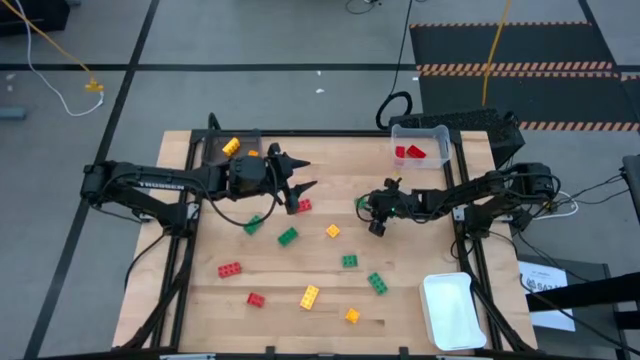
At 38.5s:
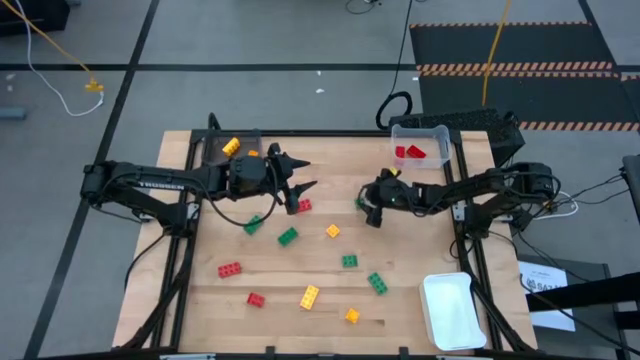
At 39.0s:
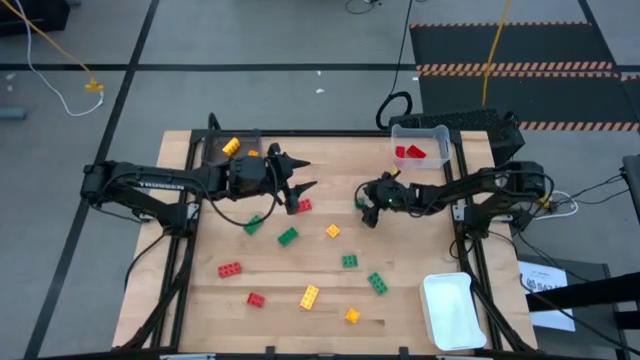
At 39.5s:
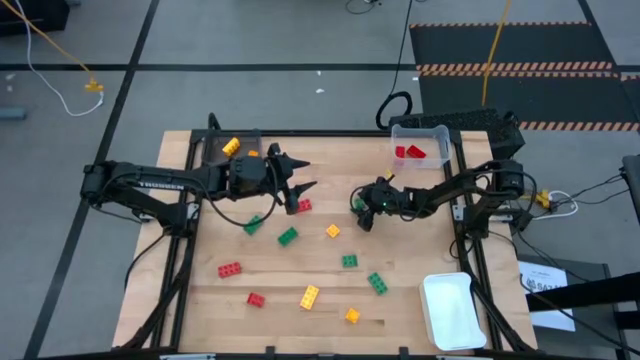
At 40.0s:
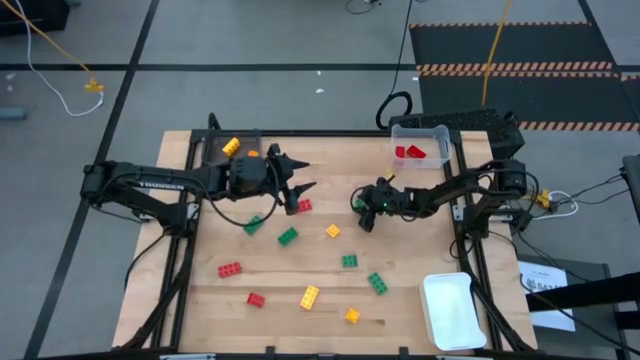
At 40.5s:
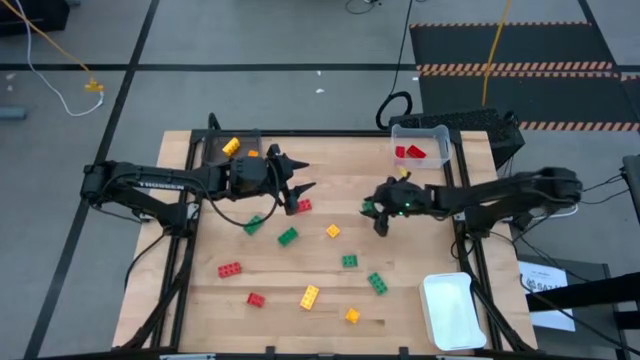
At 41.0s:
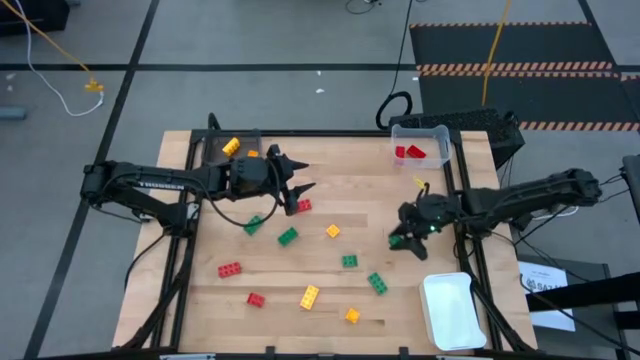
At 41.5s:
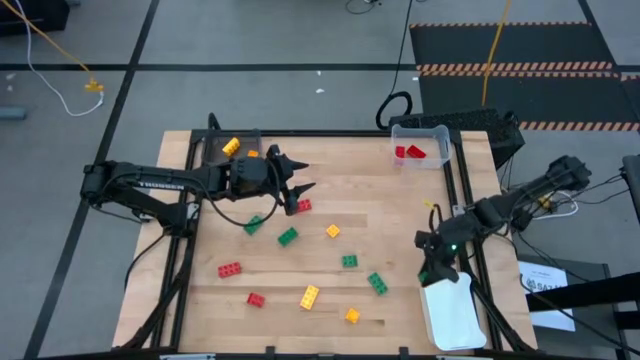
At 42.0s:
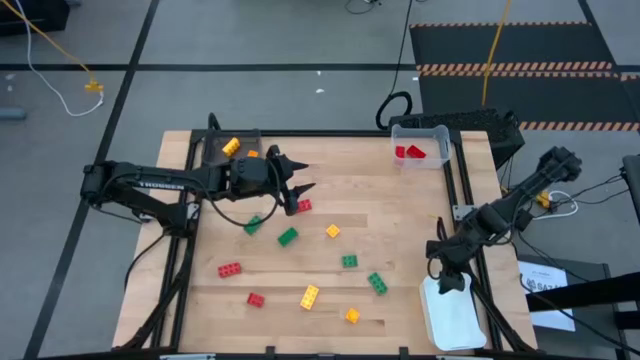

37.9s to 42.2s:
Task: Sort & place blocks by color
Put the green gamepiece into the white bin

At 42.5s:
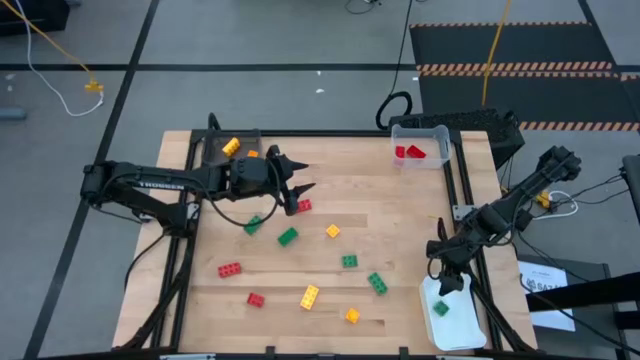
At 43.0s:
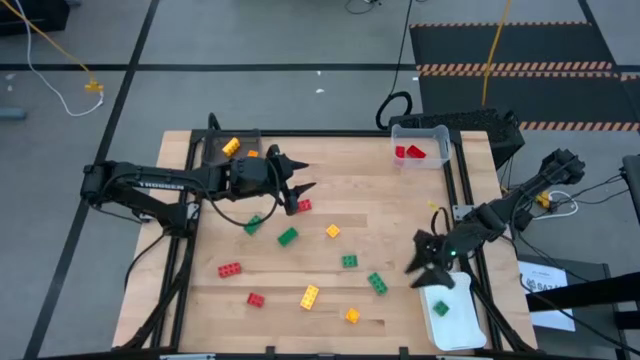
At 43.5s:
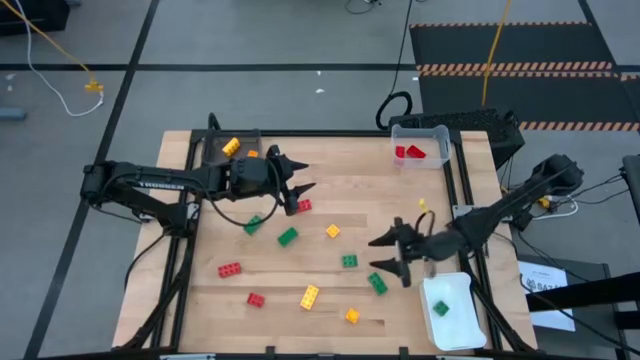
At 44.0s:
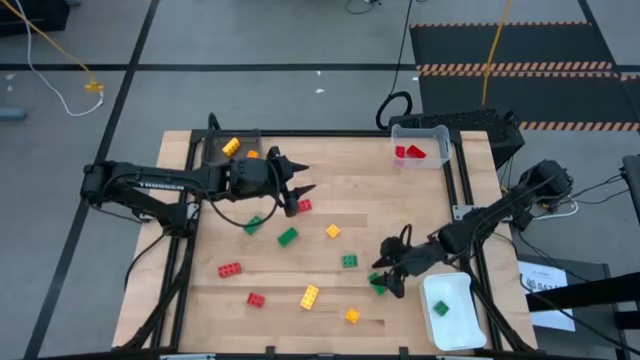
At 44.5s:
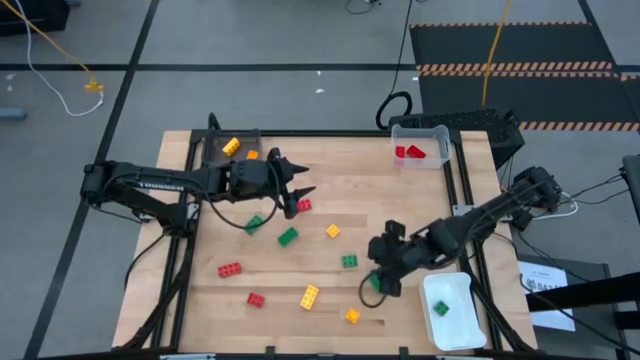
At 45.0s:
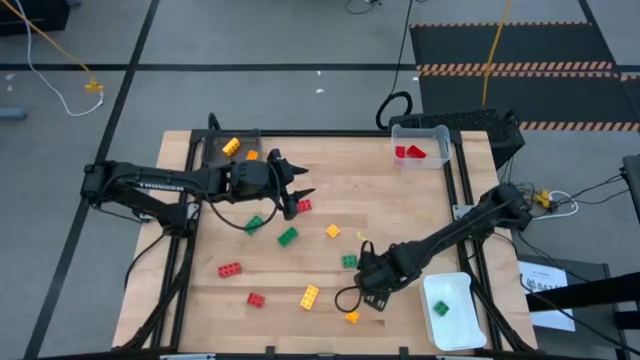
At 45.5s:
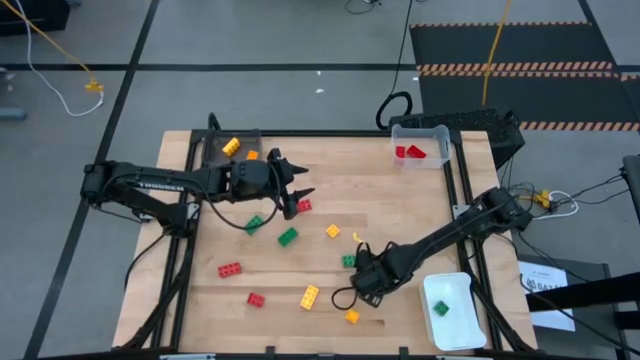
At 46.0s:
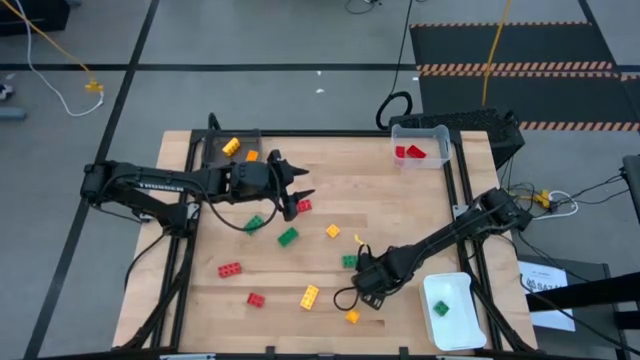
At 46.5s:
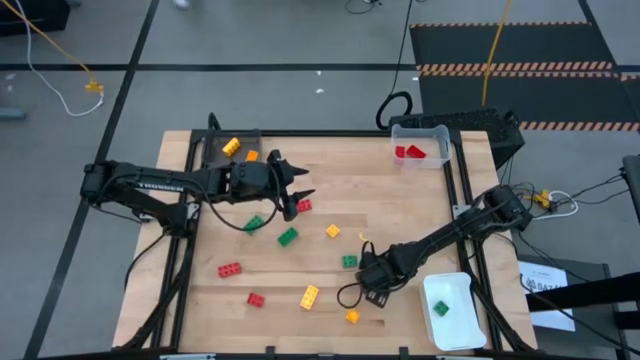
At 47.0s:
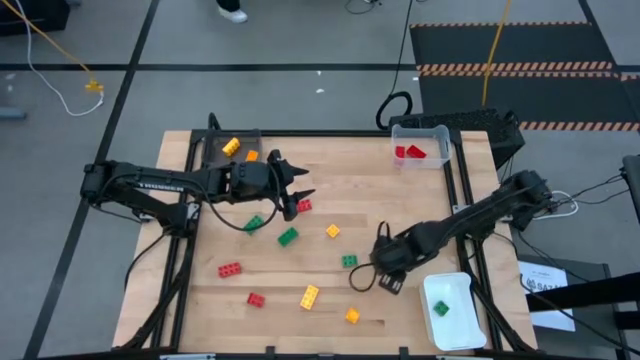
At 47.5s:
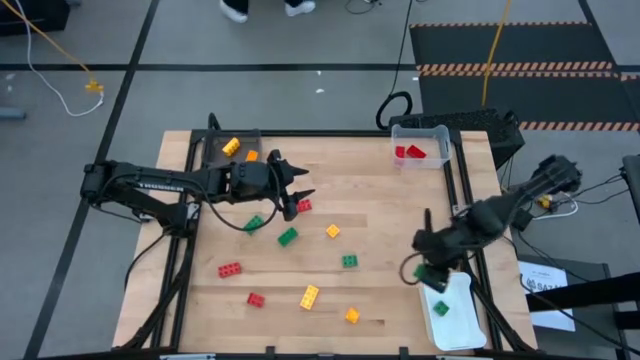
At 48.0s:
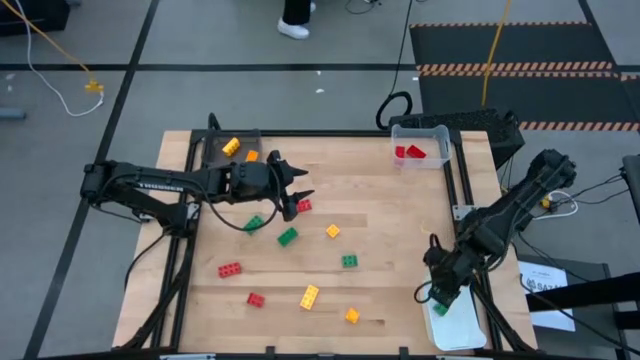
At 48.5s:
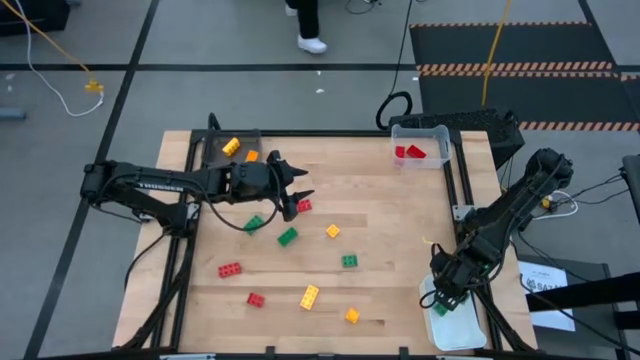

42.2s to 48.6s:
Put the green gamepiece into the white bin

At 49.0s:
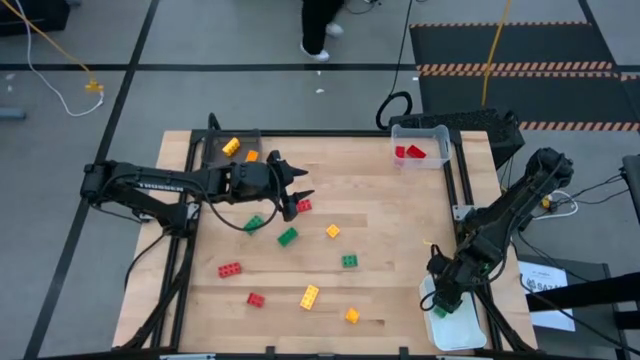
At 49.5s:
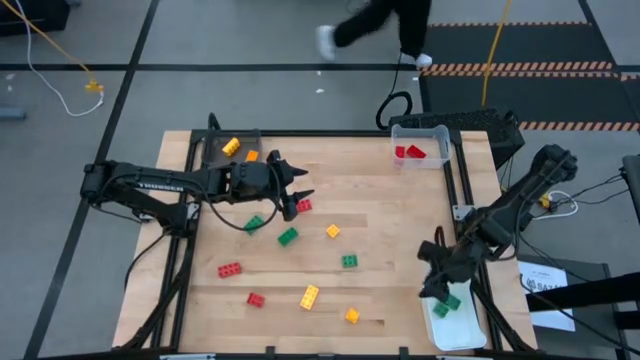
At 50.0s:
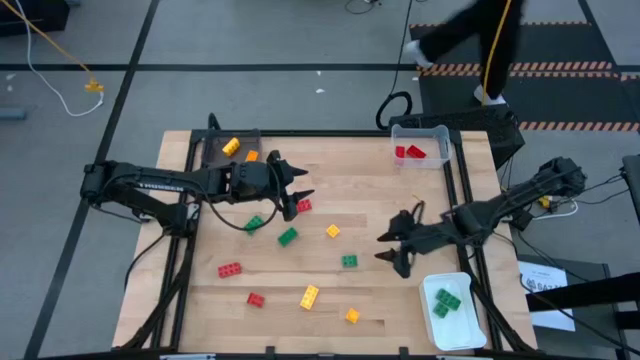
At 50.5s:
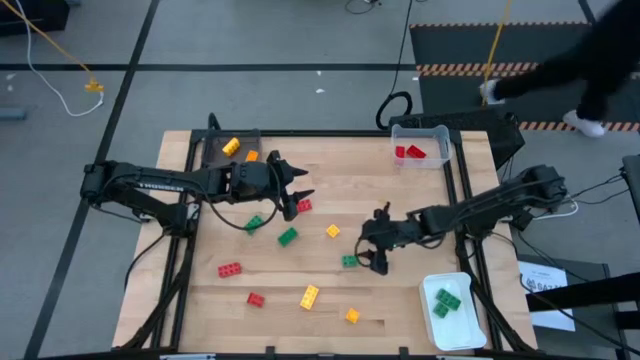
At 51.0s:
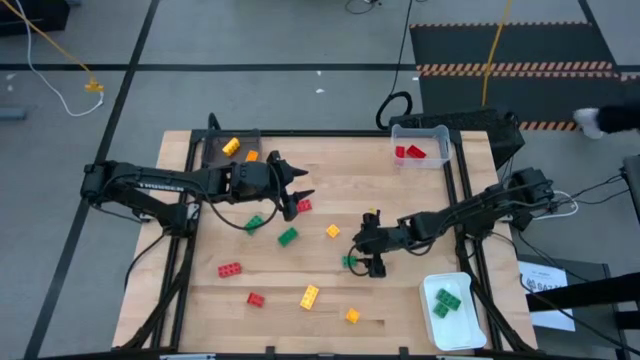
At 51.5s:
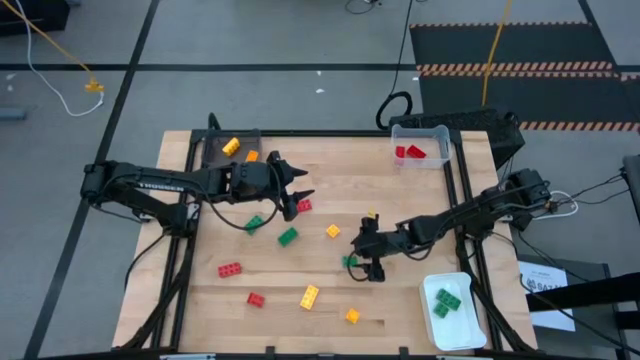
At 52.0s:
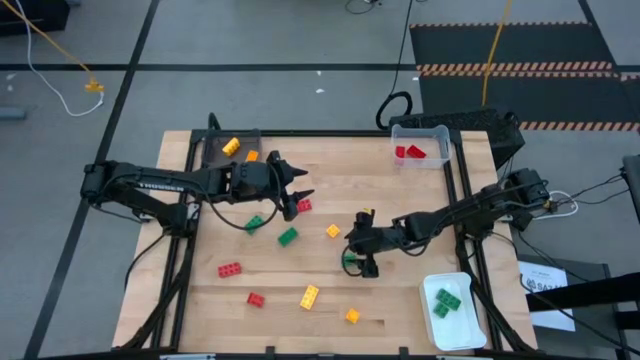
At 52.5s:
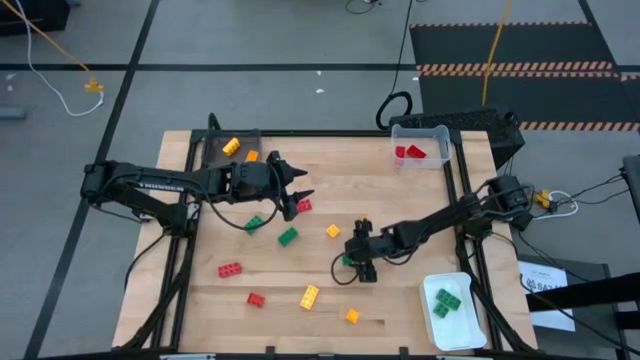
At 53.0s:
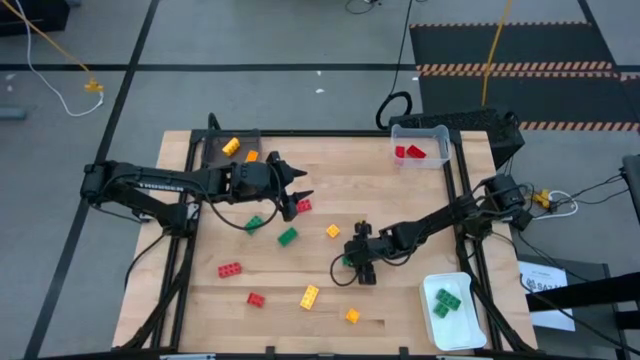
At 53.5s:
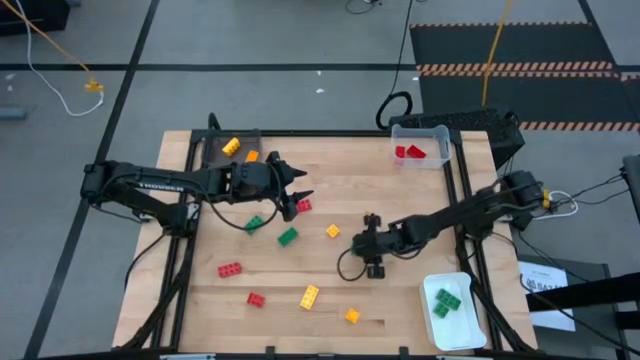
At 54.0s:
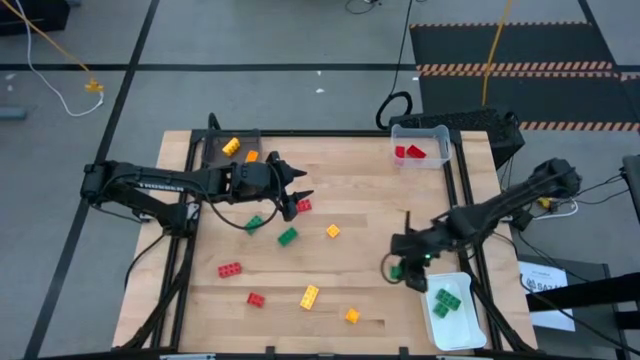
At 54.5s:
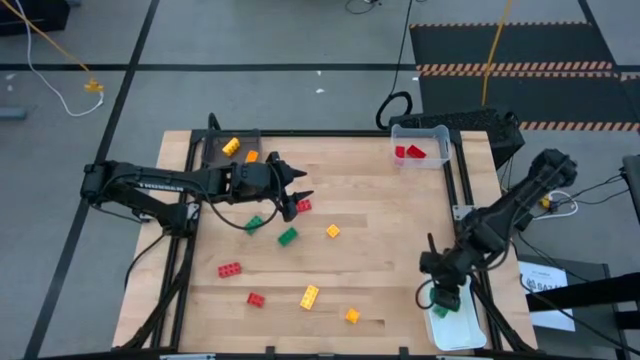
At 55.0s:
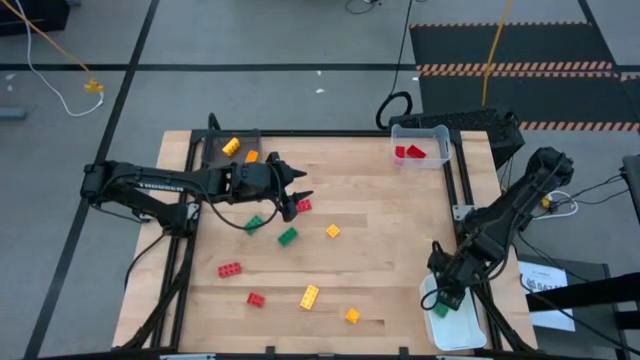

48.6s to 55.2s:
Put the green gamepiece into the white bin

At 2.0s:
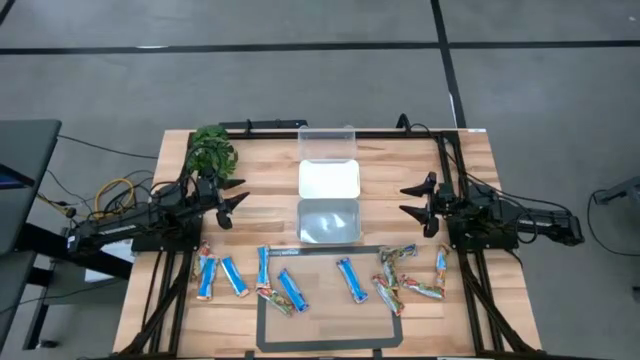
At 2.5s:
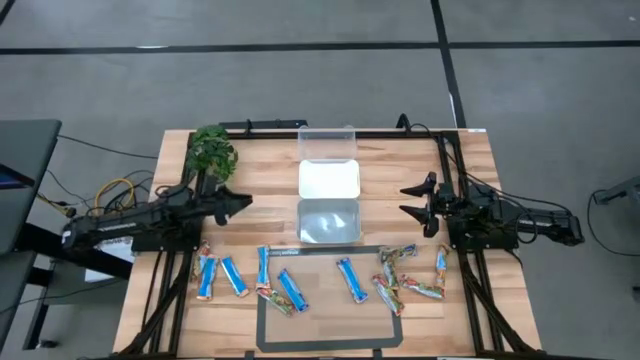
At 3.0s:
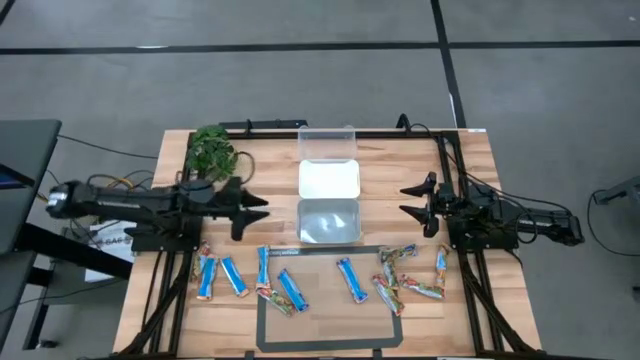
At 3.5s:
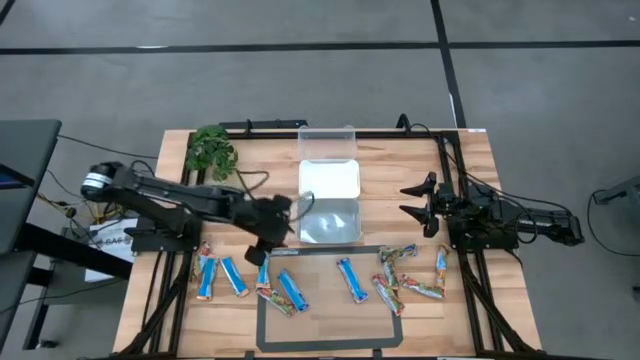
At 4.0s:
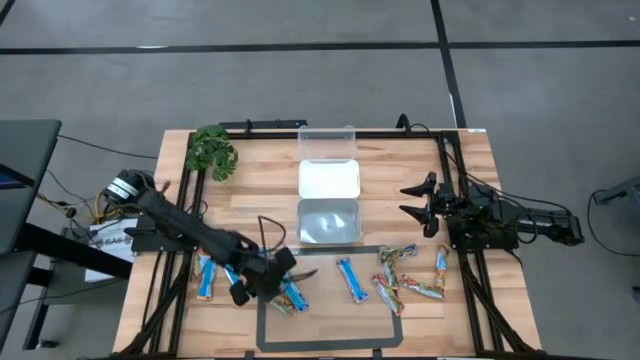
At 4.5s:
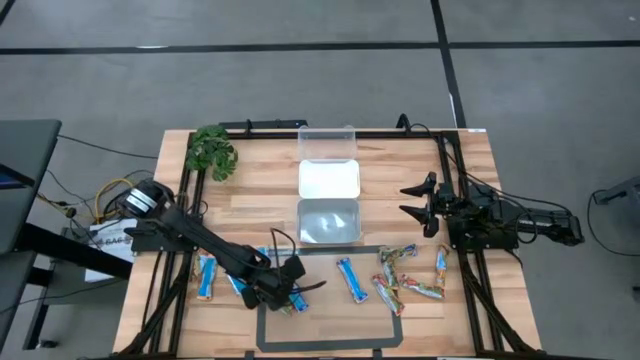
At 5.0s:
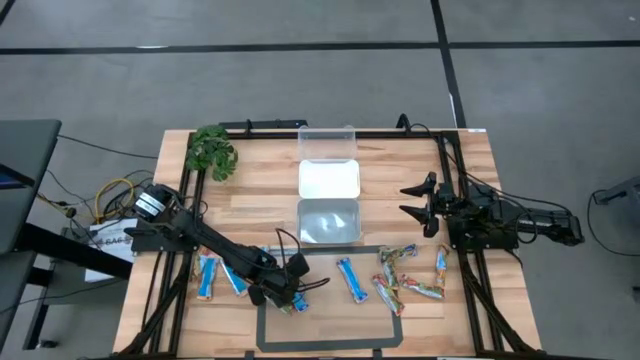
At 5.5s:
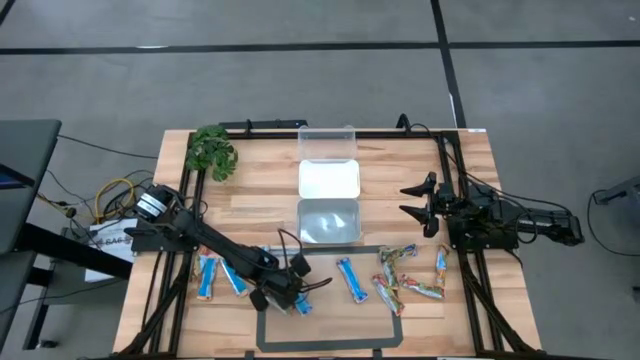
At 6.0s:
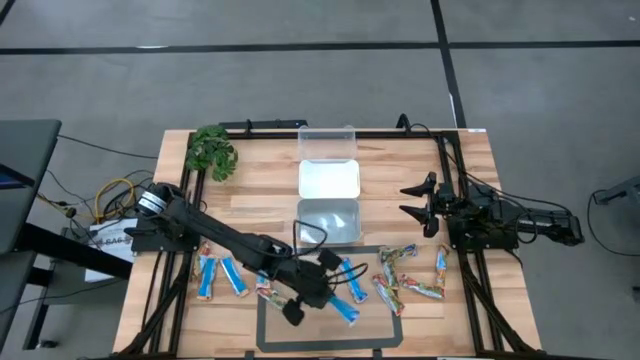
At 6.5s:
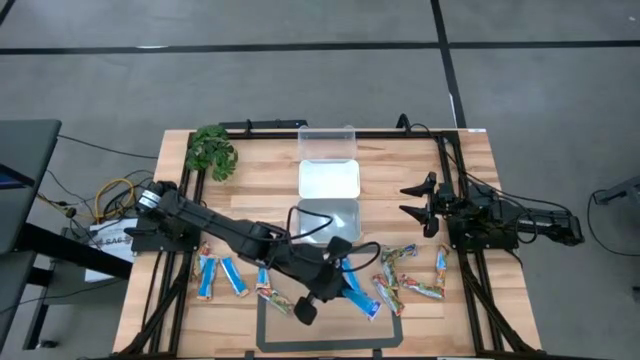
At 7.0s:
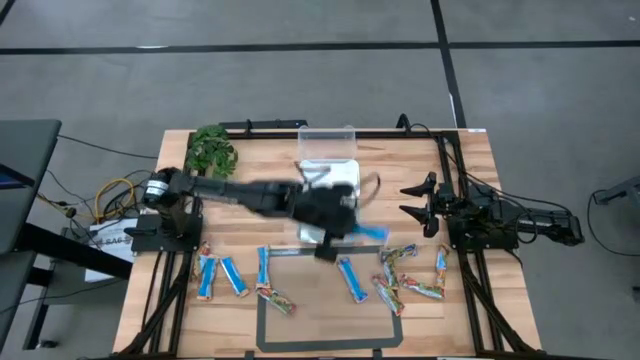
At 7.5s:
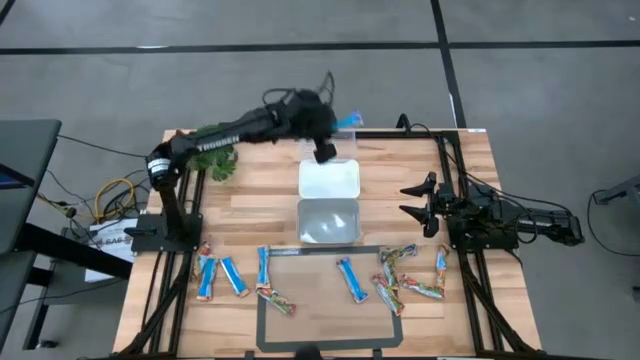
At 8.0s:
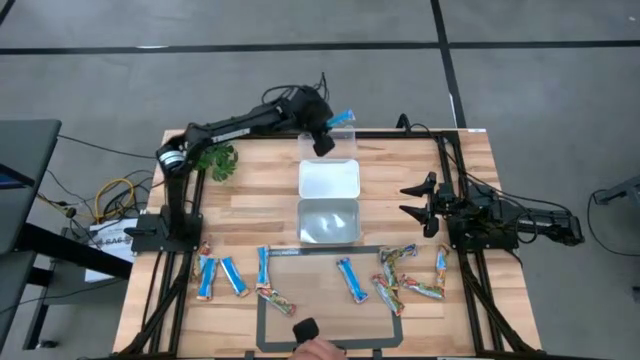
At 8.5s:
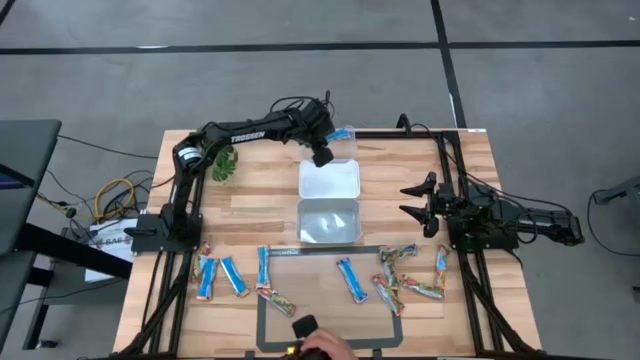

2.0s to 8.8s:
Task: Pick and place Granola Bars by type
Put the blue granola bar into the transparent bin
